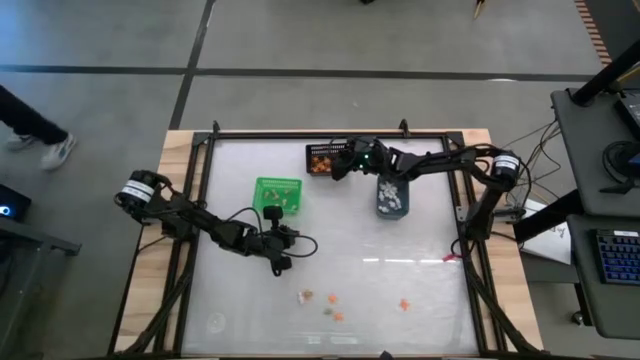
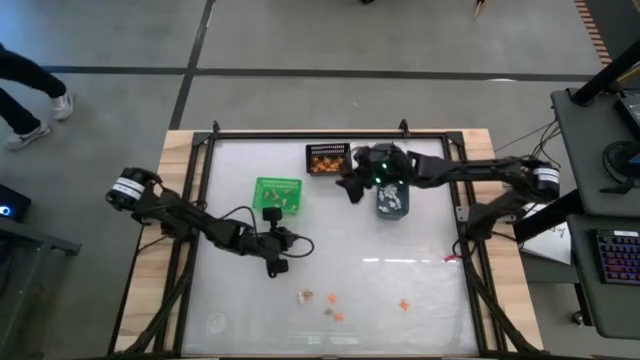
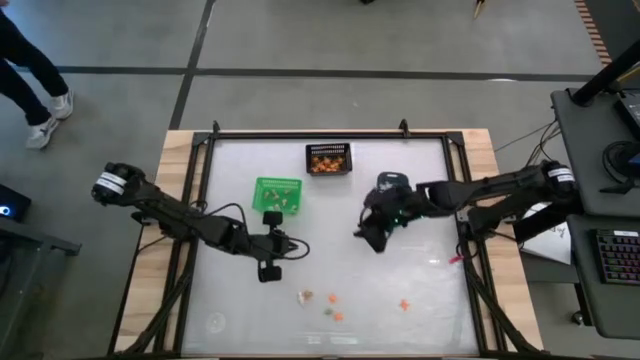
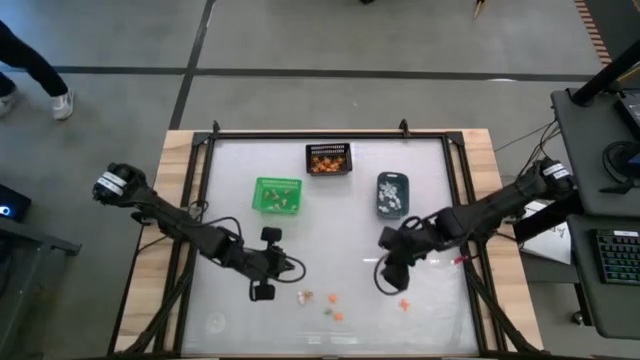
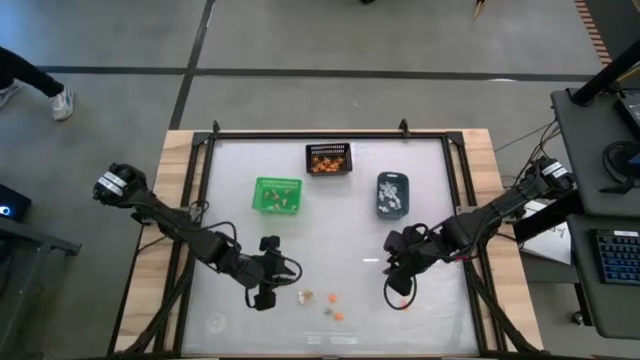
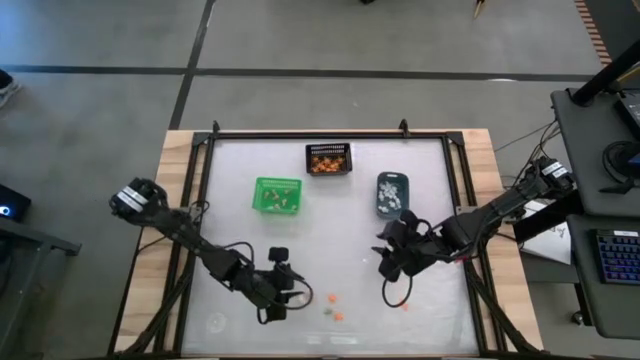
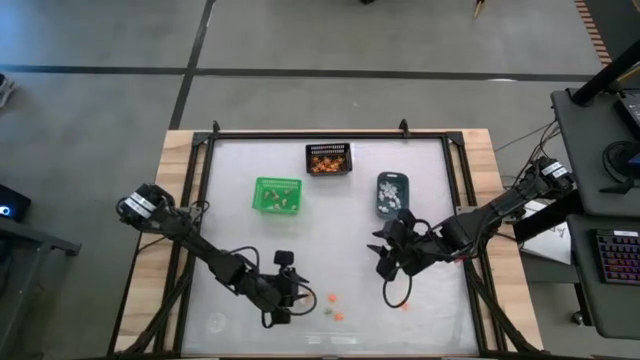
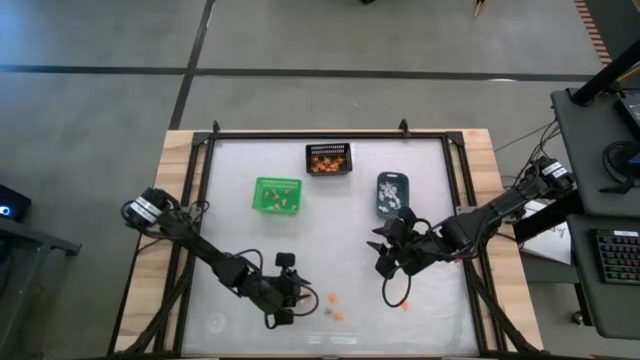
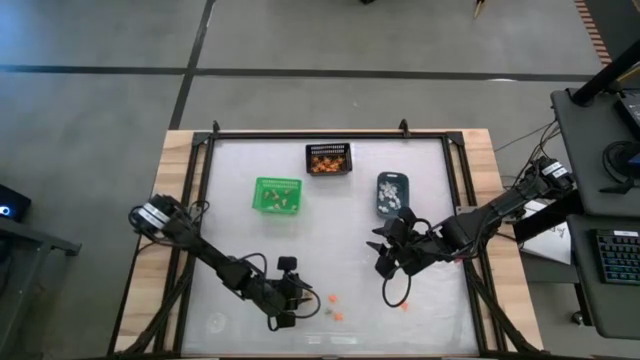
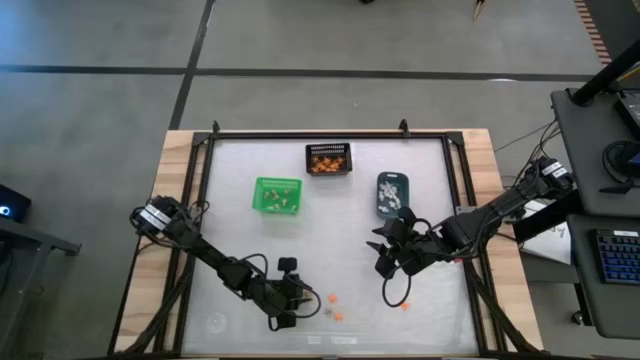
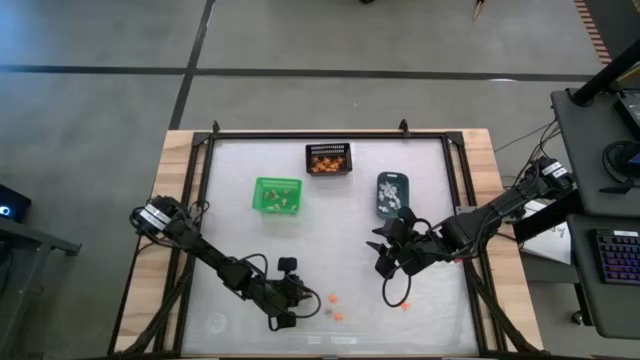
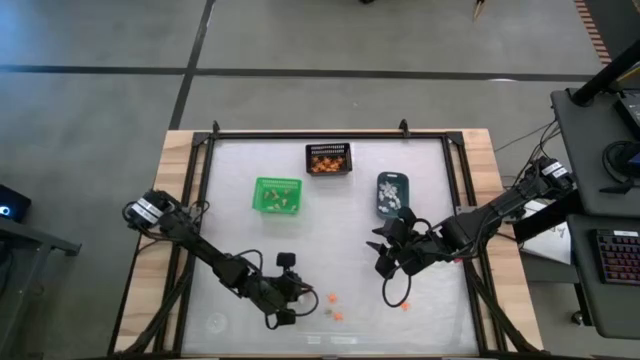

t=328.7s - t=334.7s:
Task: Sort Halloween decoration
Put the gray skull toy into the green bin

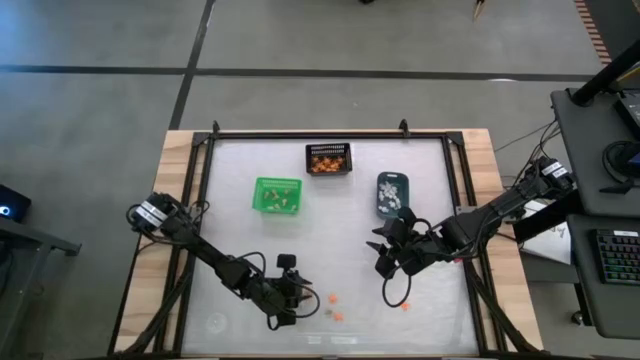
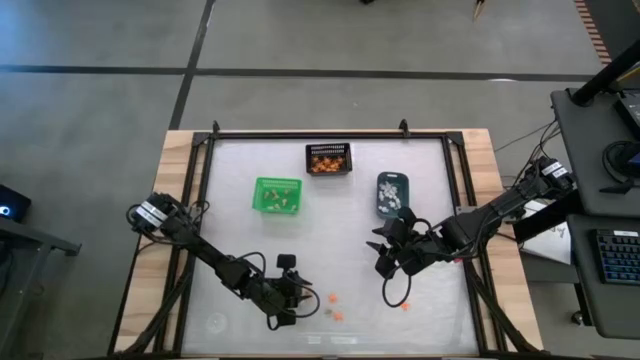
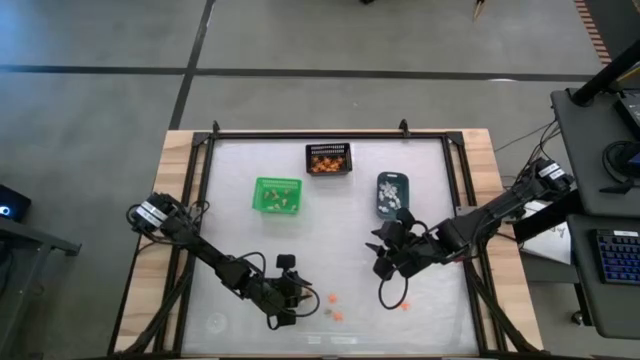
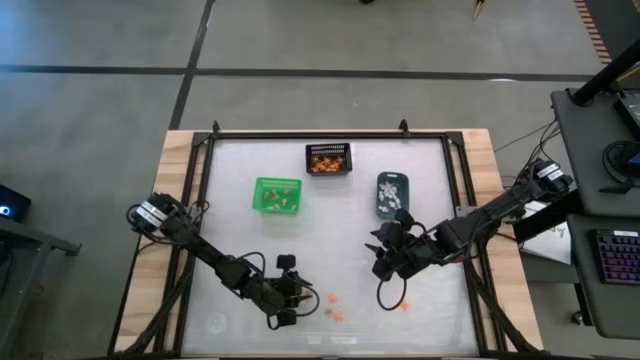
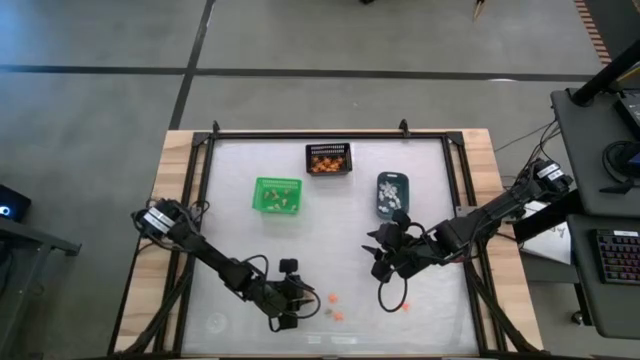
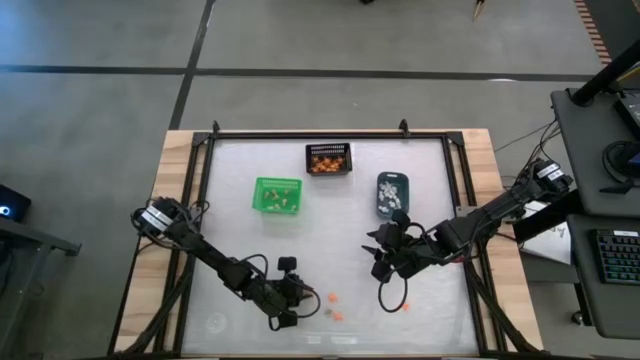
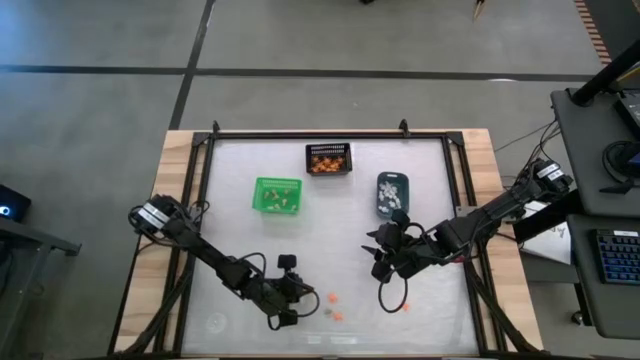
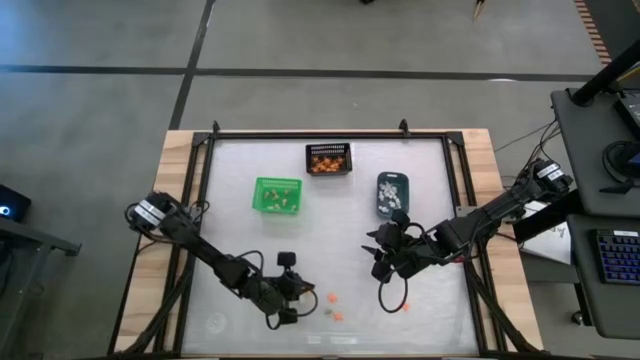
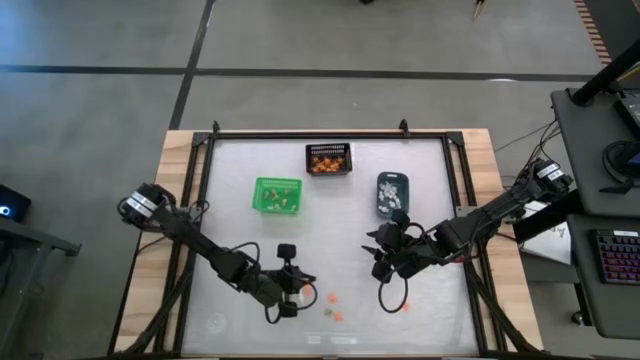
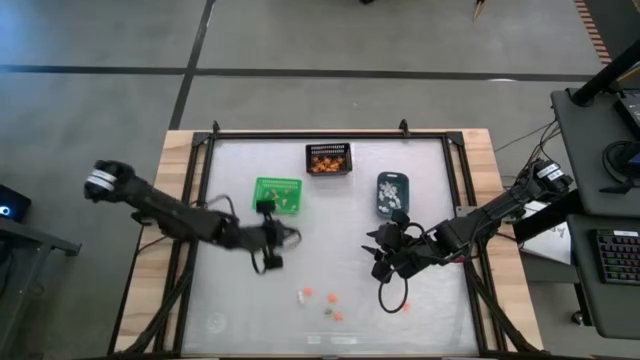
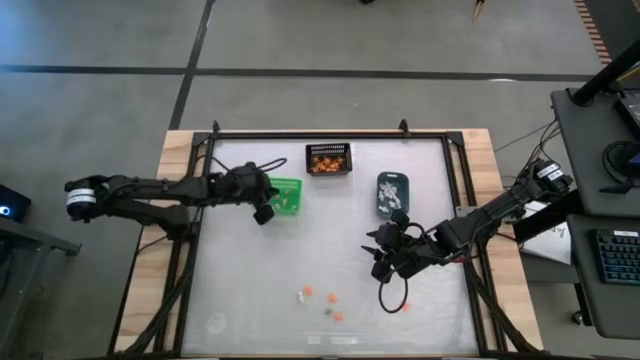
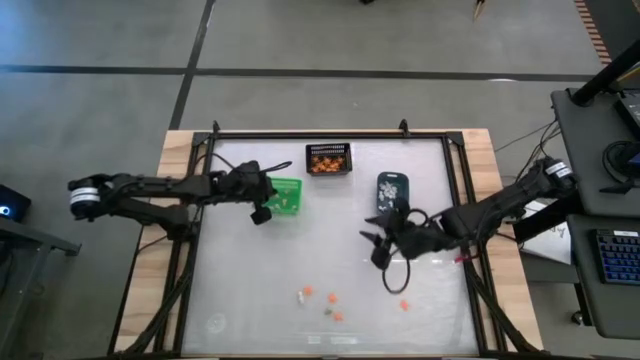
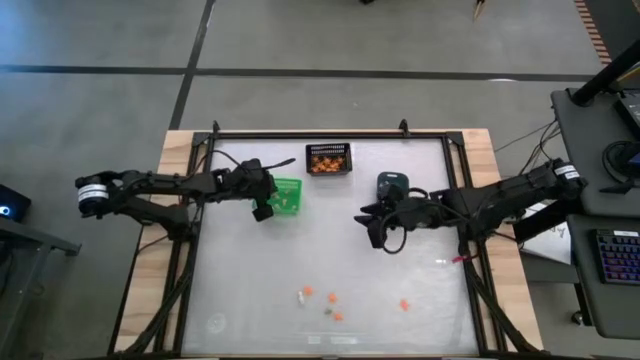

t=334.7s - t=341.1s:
Put the gray skull toy into the green bin

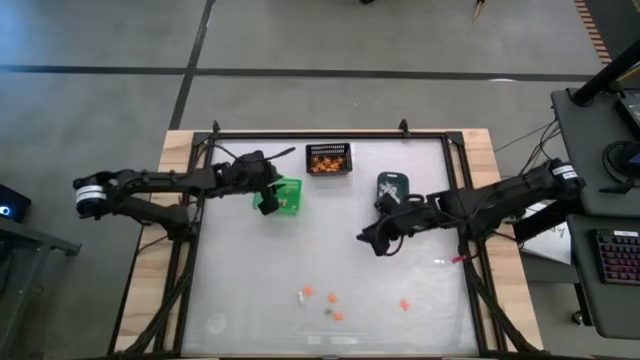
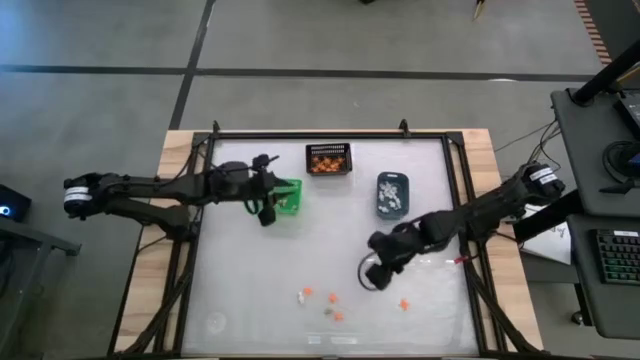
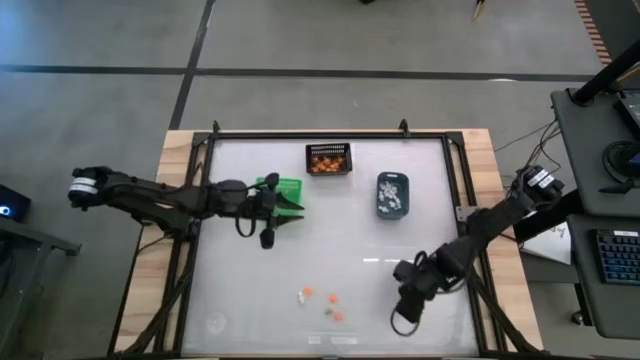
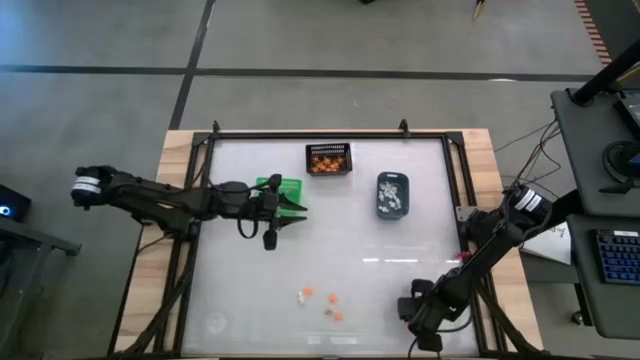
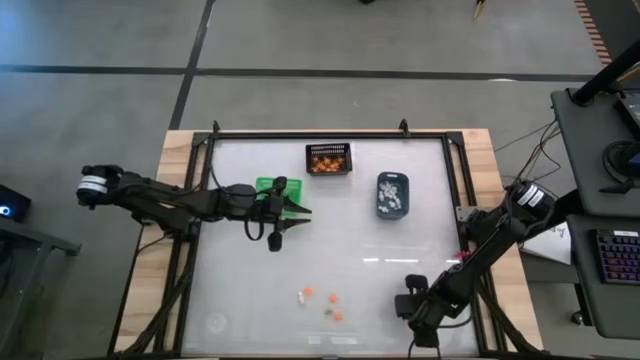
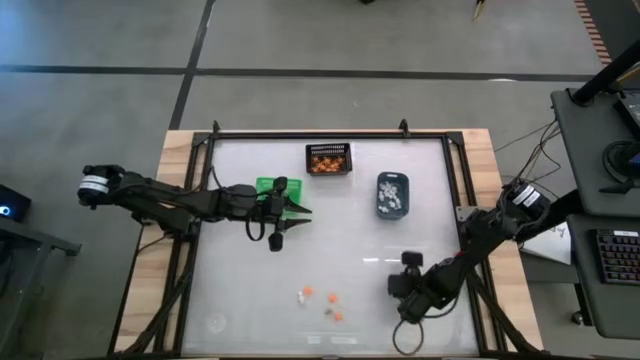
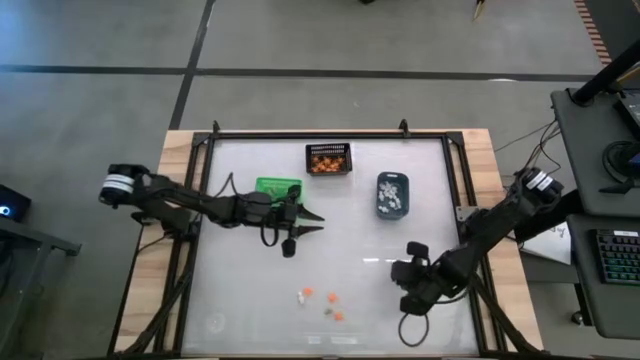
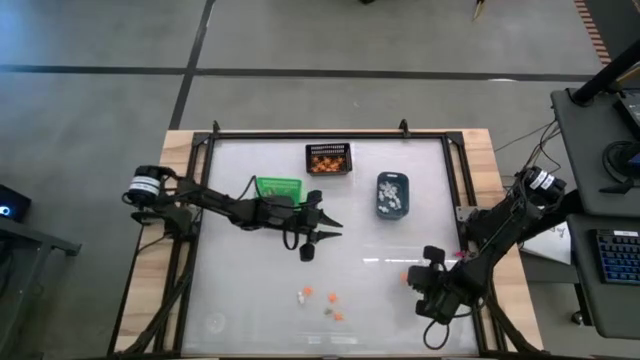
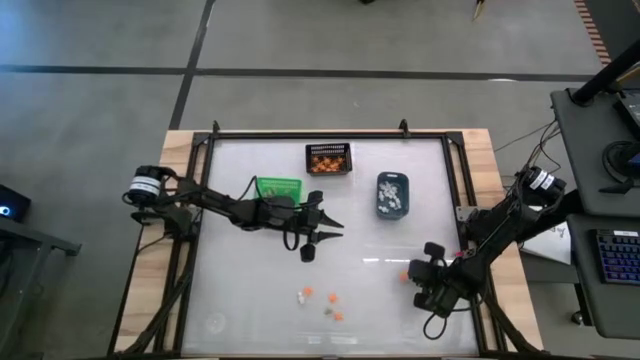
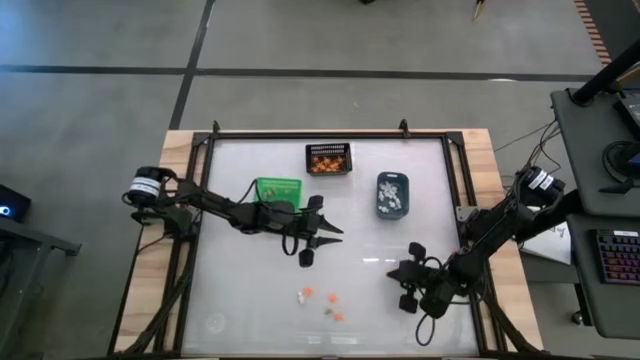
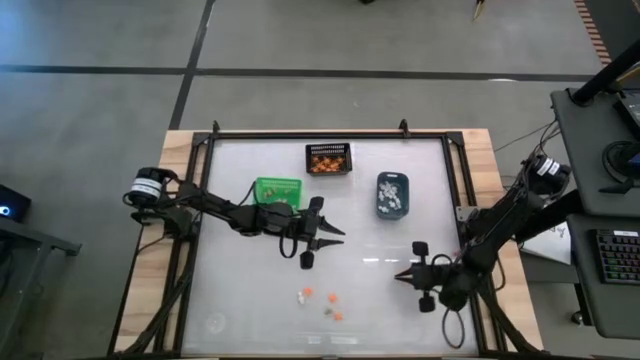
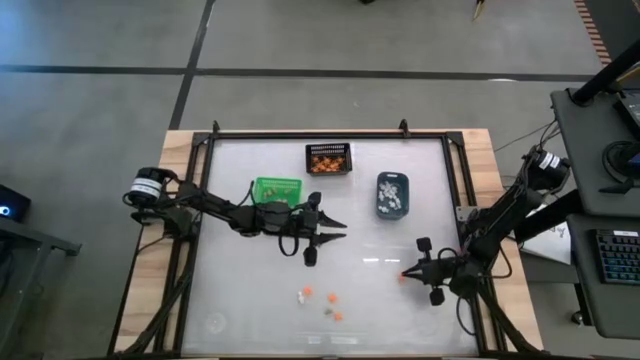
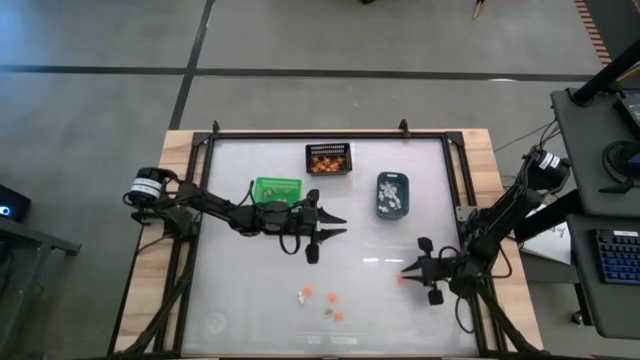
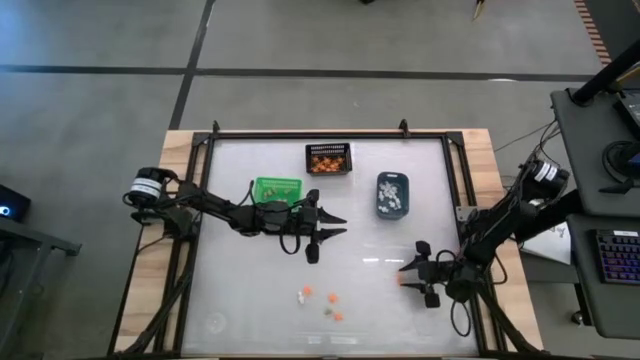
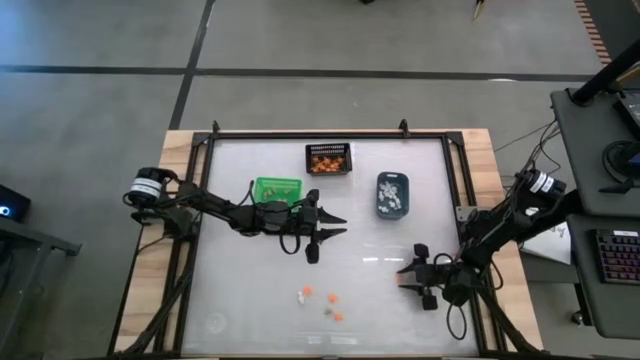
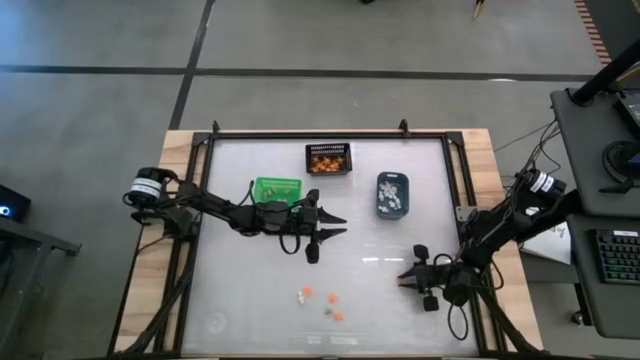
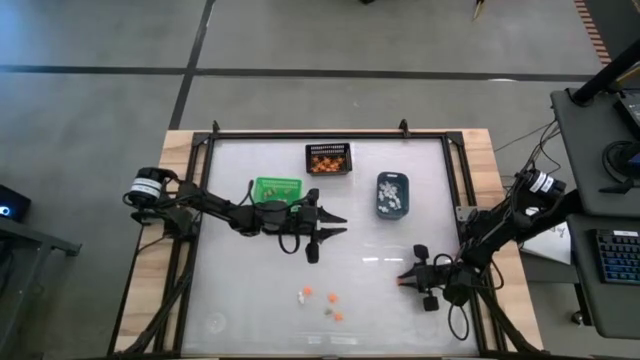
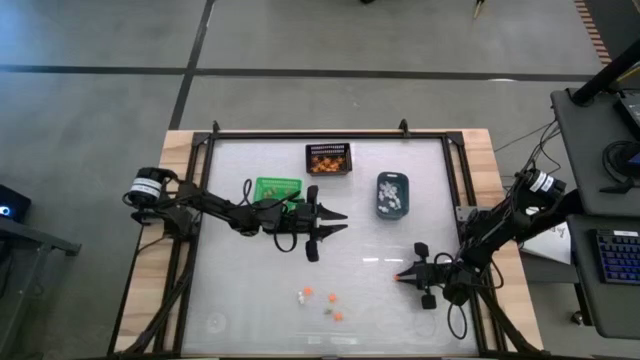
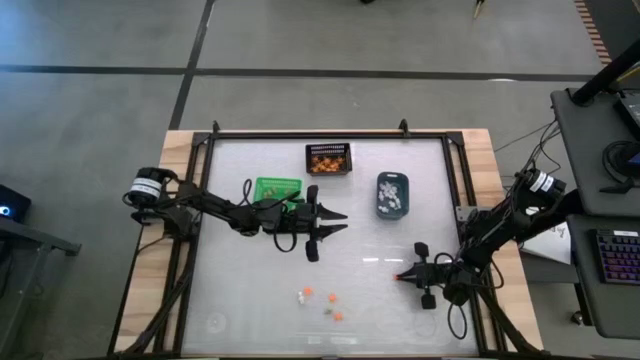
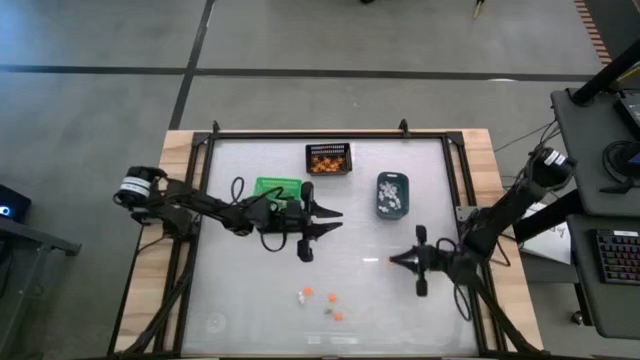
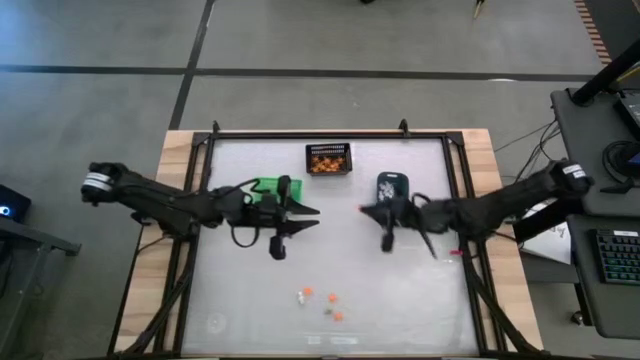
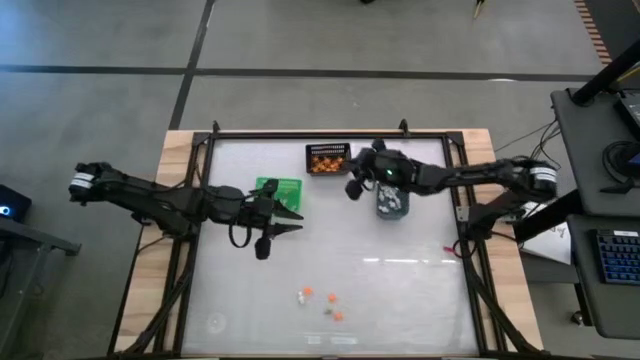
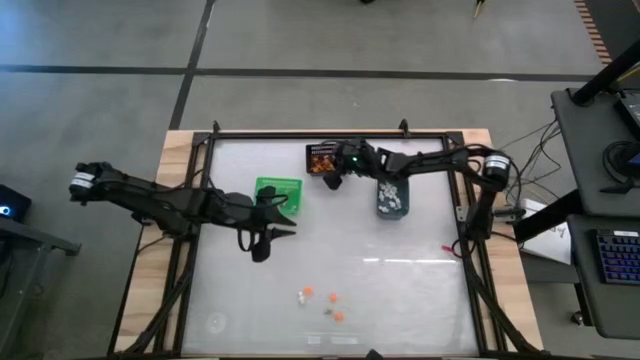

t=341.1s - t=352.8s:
Put the orange spider toy into the black bin
